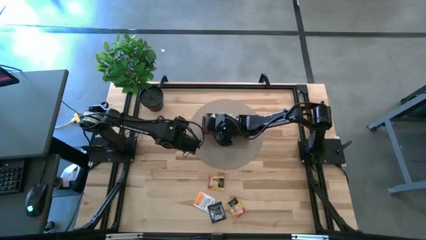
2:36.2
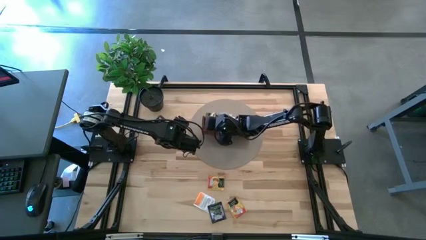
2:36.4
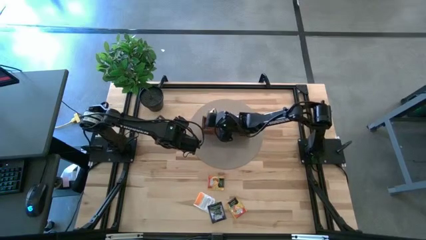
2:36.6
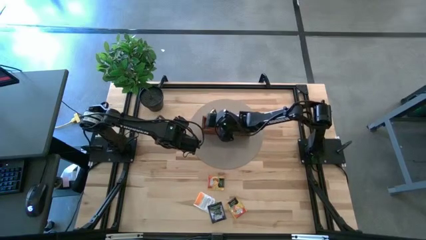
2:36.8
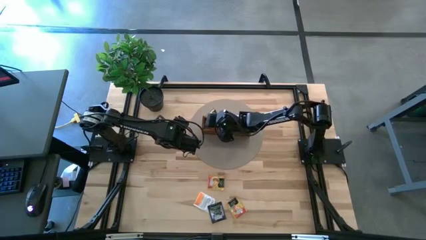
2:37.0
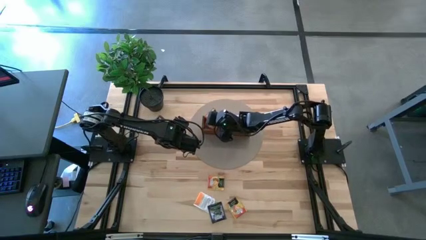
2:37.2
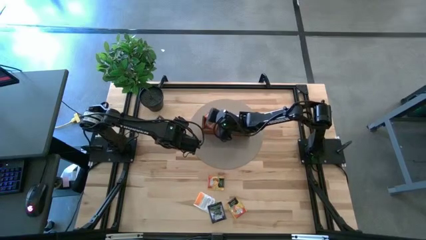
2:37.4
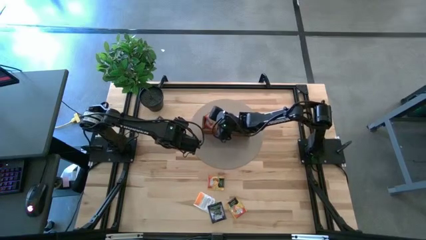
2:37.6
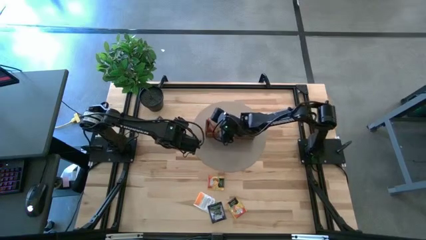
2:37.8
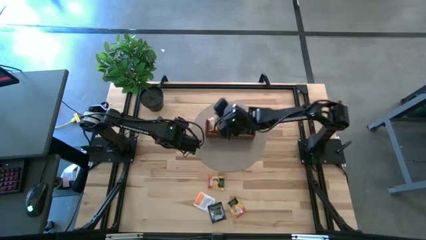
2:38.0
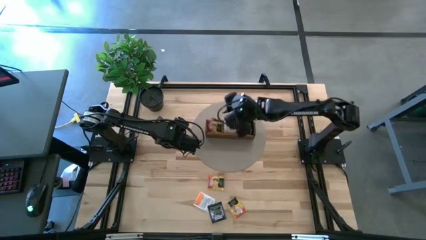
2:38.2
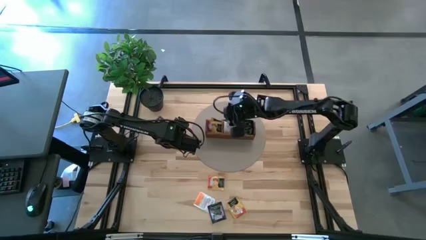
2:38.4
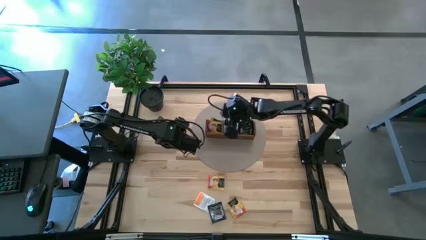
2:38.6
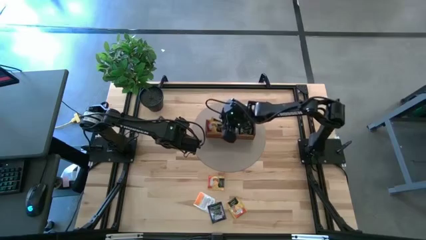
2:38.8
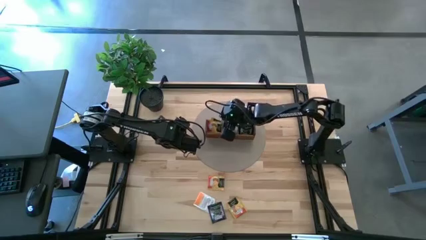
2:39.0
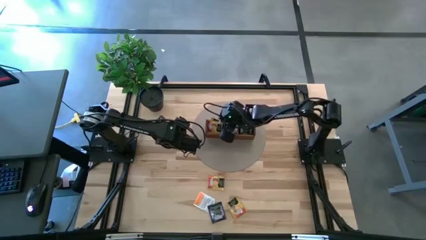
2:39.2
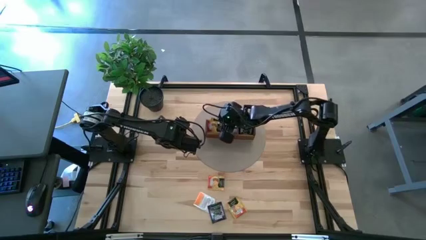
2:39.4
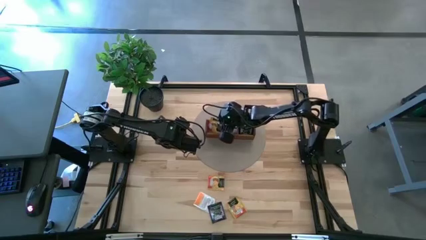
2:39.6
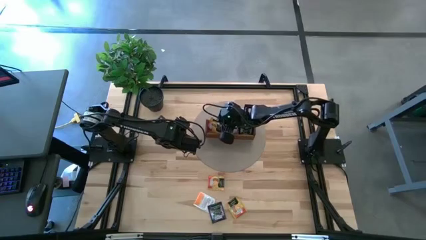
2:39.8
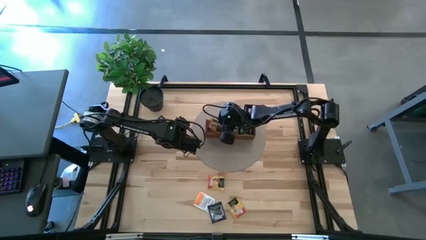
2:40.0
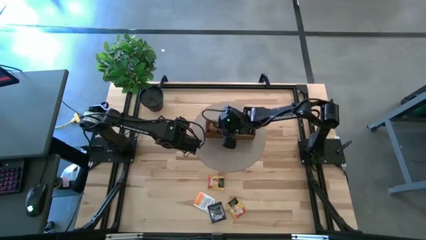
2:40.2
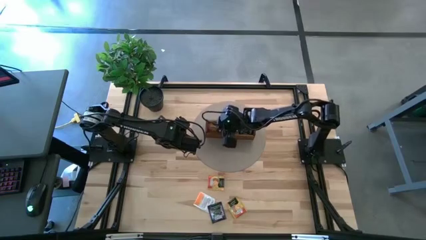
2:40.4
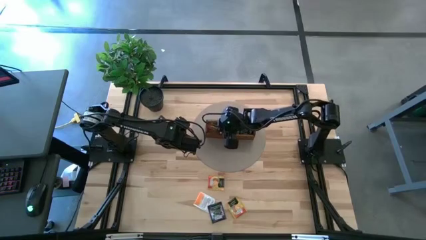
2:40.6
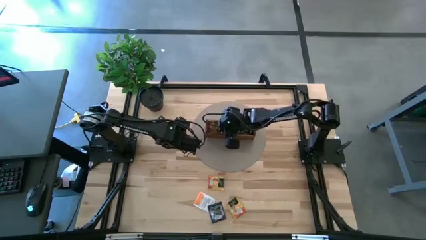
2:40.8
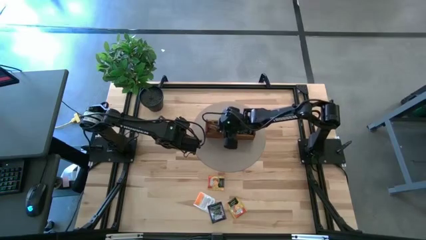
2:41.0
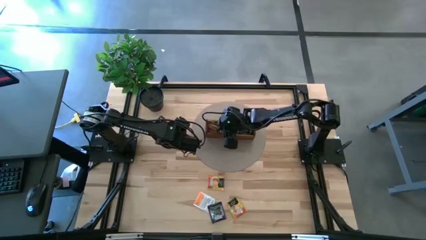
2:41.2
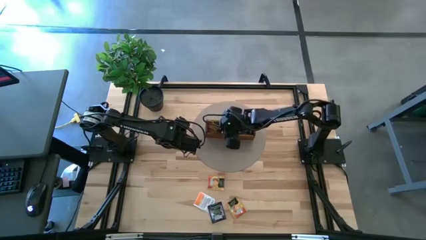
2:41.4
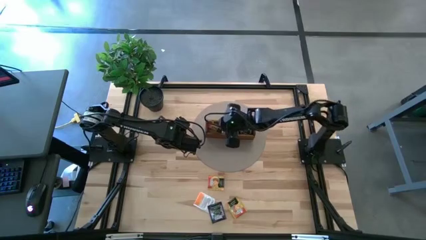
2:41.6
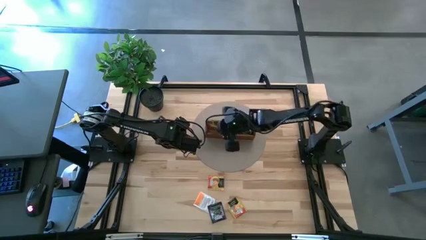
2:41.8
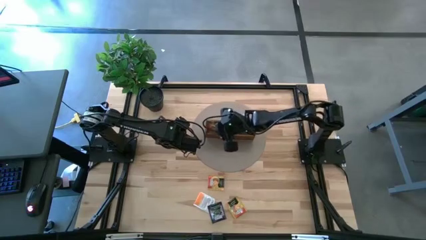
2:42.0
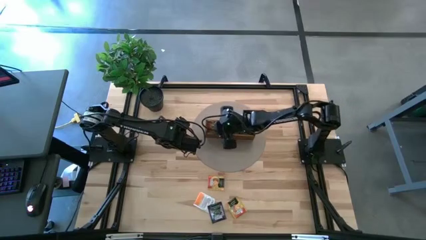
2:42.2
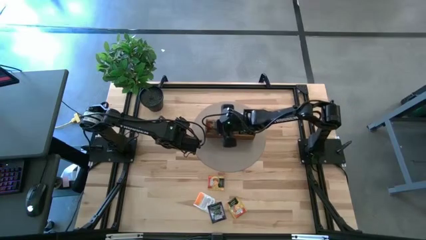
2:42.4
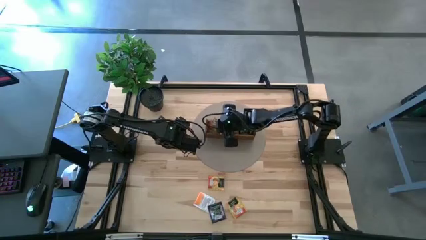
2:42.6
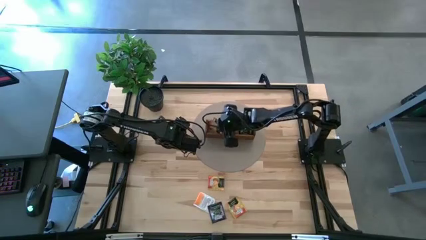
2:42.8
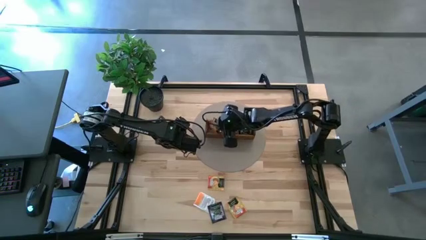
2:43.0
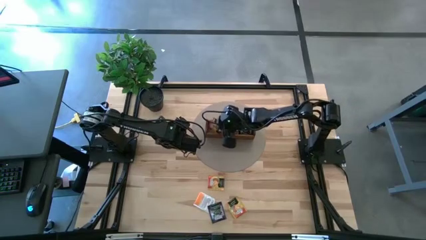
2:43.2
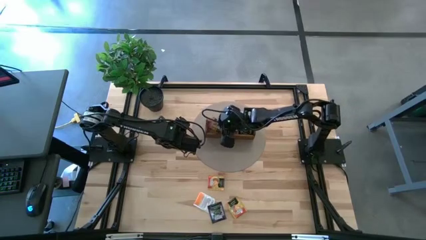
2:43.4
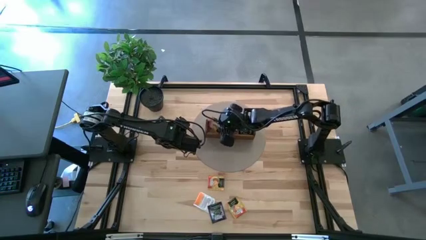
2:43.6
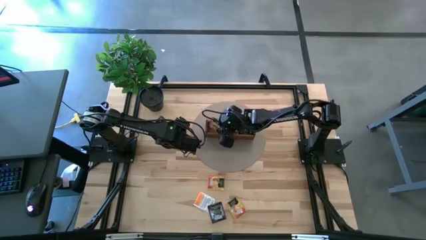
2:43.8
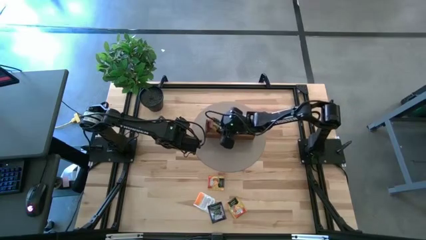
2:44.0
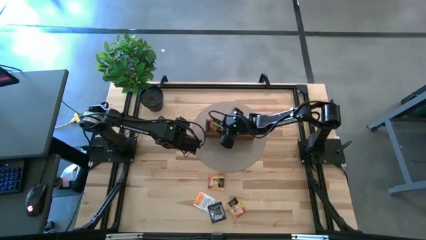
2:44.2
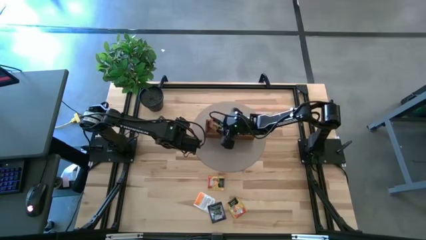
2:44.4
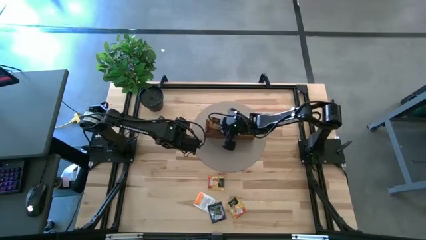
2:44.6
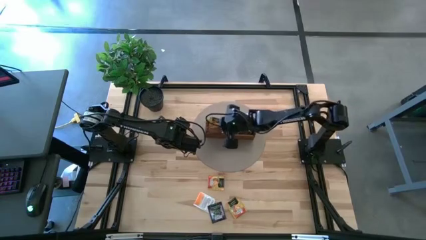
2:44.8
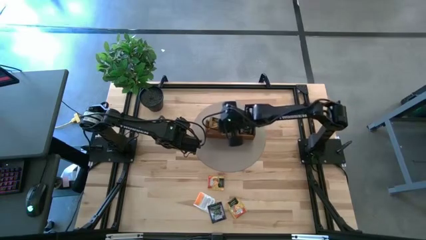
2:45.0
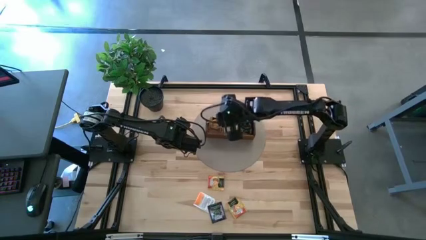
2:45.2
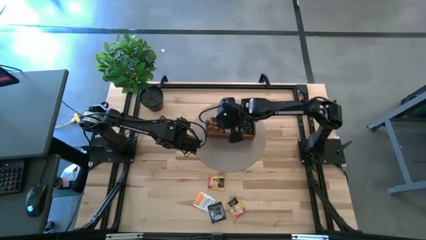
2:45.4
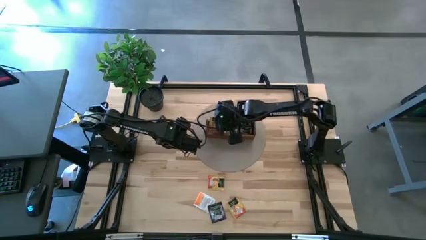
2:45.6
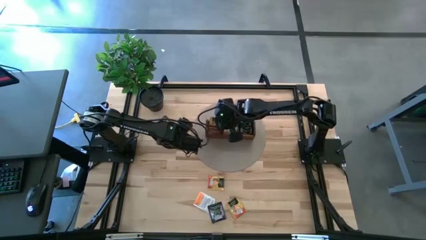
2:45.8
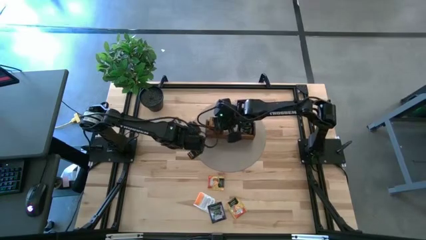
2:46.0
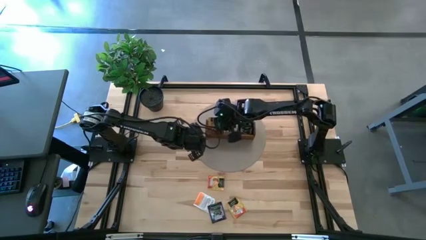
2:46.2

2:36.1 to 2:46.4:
Task: Pick & Place Tea
Put the yellow tea bag into the left section of the wooden organizer
